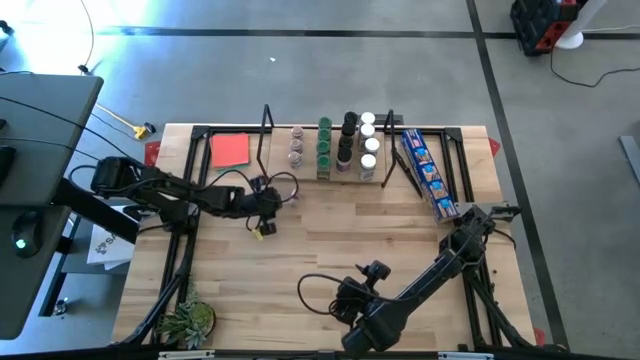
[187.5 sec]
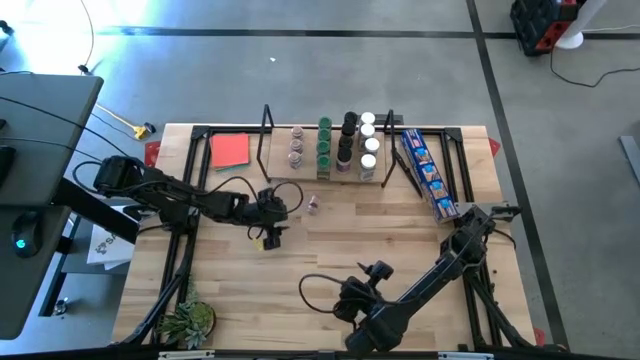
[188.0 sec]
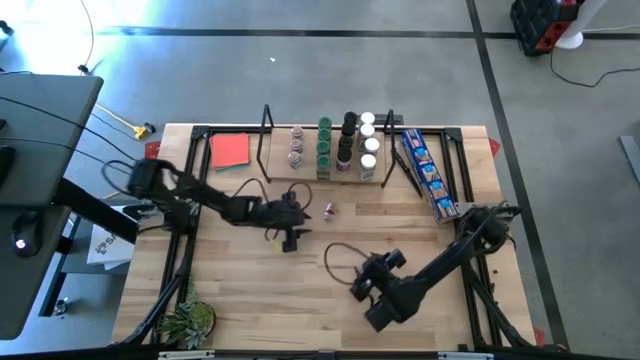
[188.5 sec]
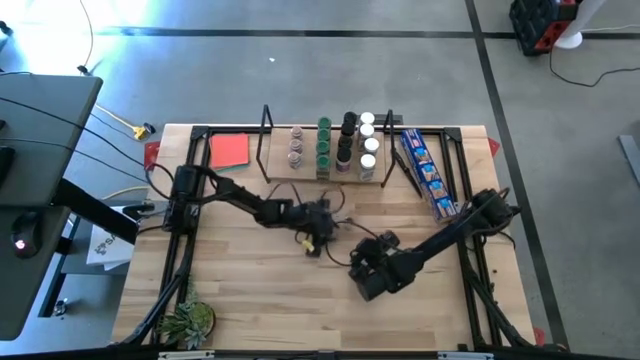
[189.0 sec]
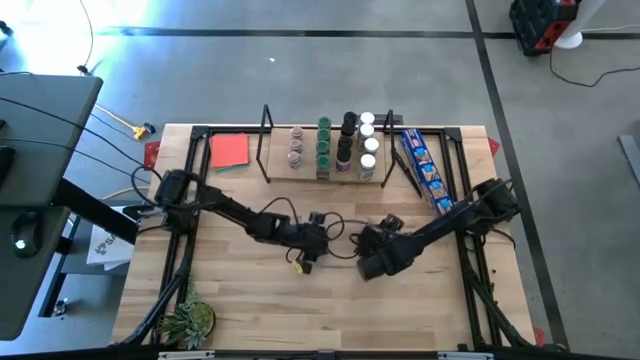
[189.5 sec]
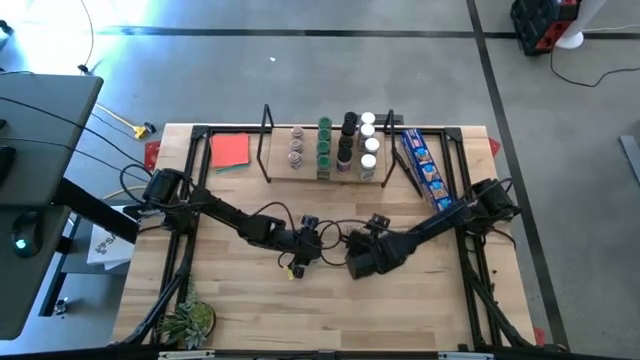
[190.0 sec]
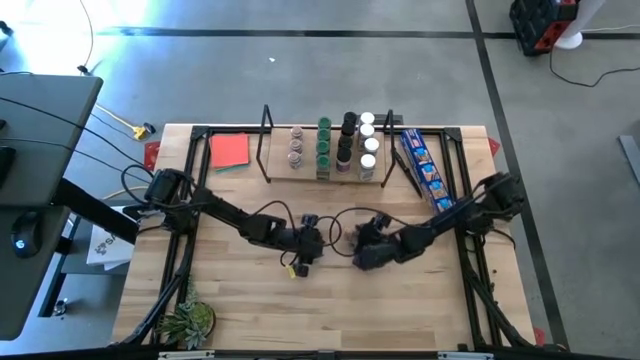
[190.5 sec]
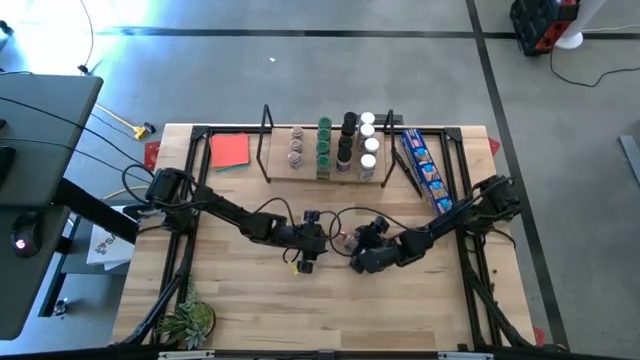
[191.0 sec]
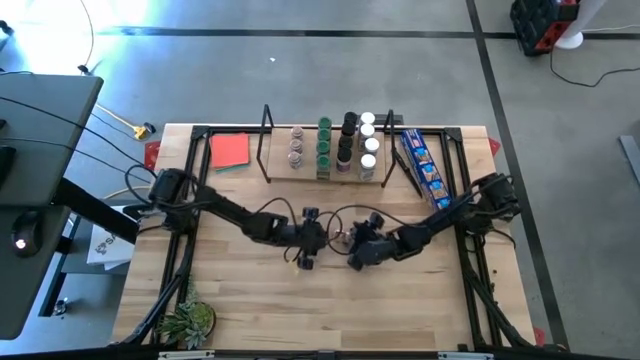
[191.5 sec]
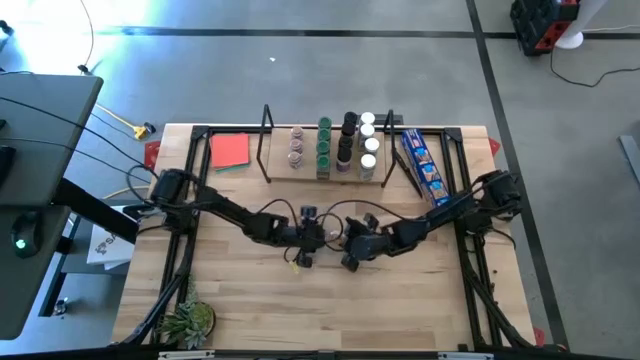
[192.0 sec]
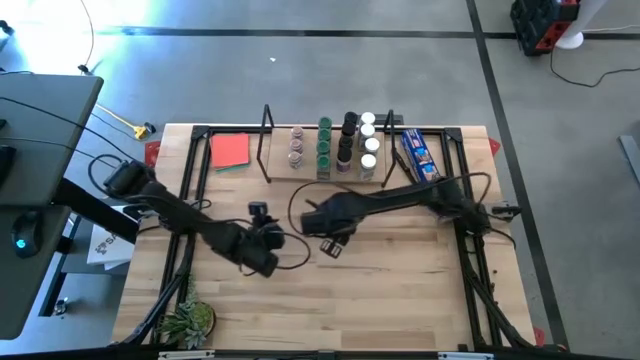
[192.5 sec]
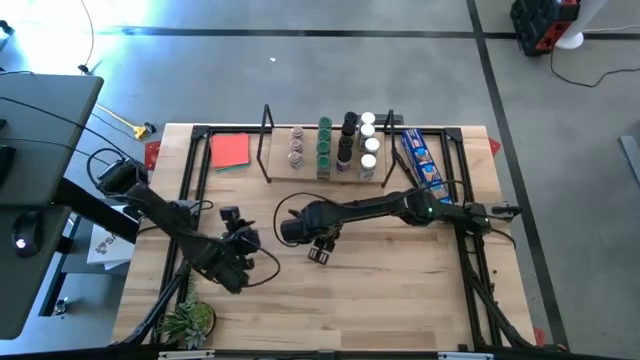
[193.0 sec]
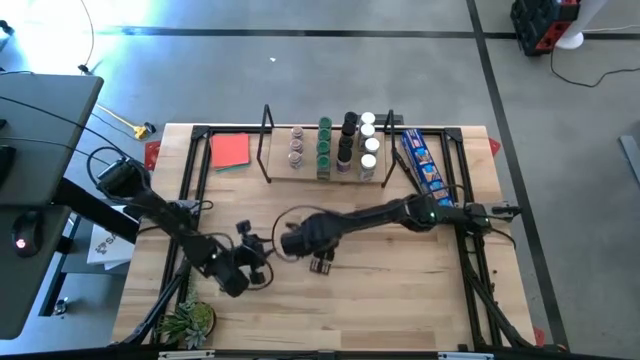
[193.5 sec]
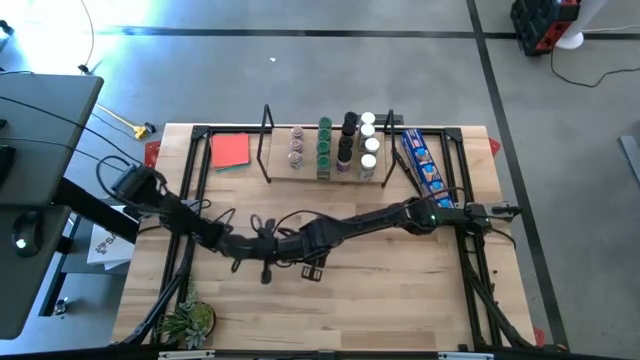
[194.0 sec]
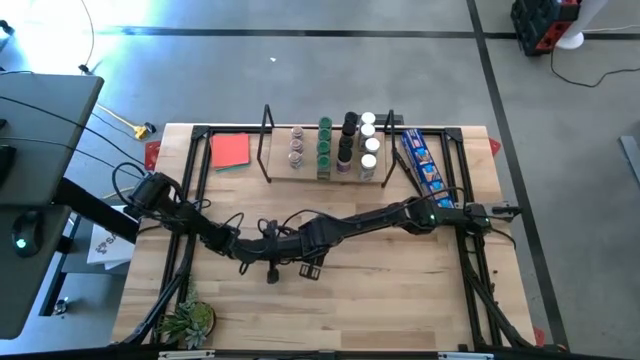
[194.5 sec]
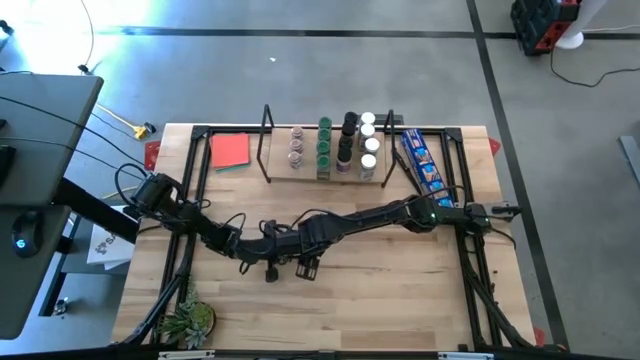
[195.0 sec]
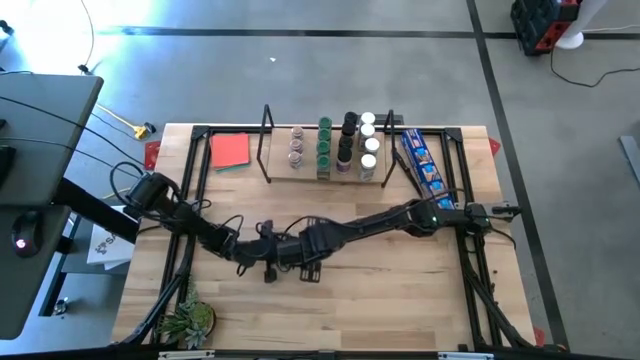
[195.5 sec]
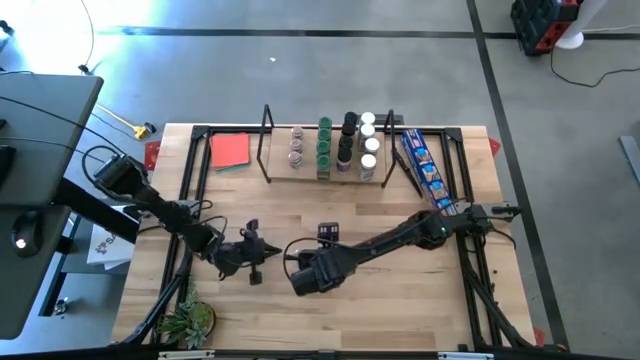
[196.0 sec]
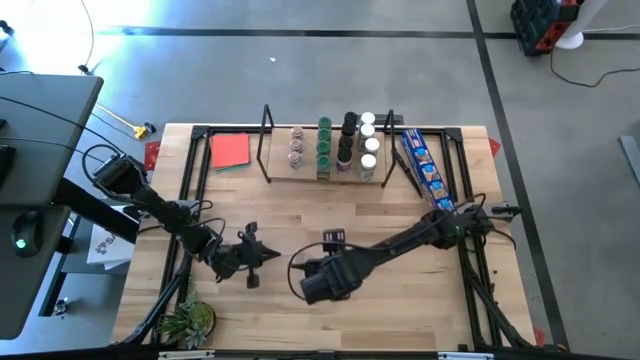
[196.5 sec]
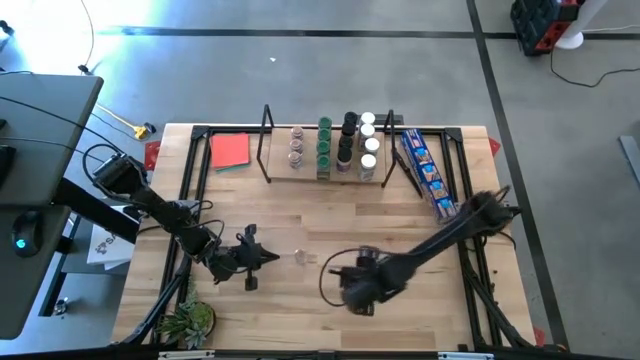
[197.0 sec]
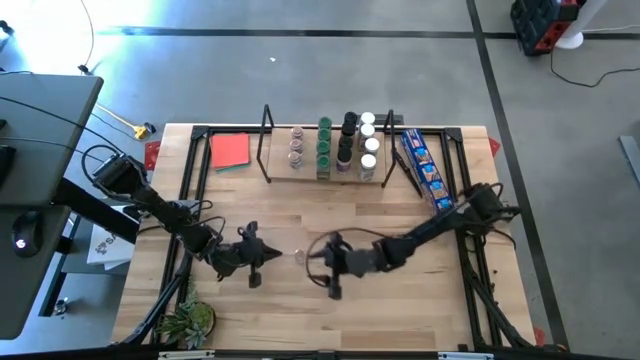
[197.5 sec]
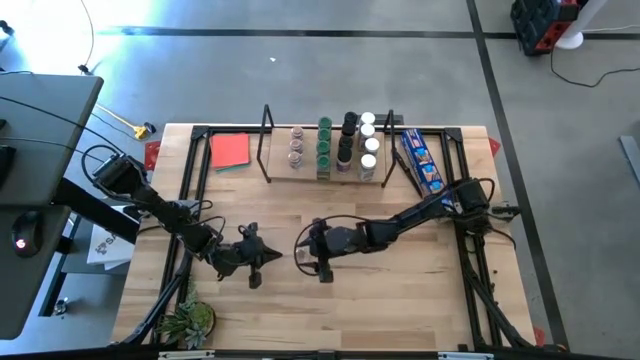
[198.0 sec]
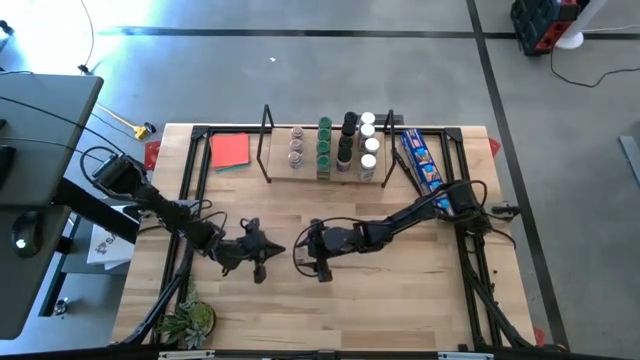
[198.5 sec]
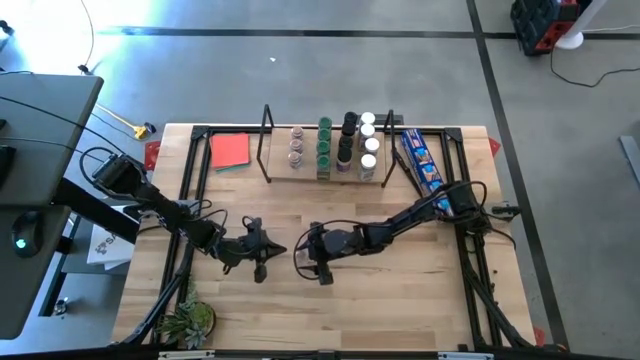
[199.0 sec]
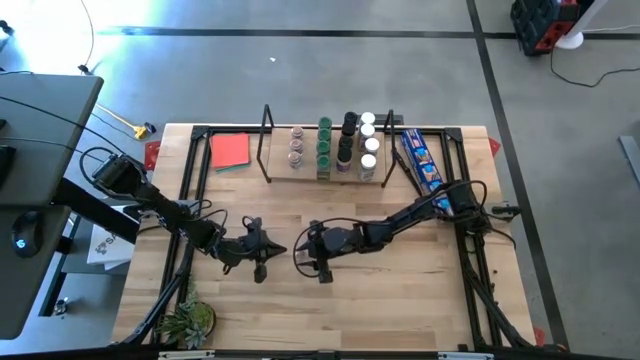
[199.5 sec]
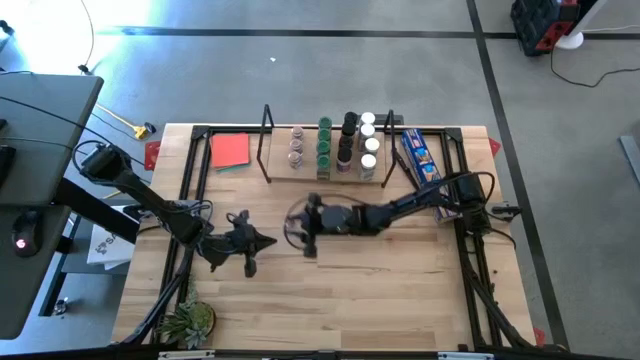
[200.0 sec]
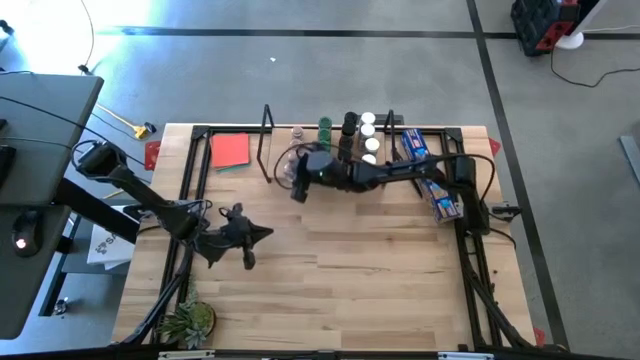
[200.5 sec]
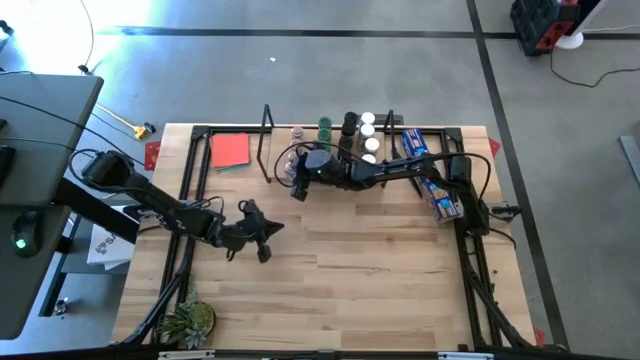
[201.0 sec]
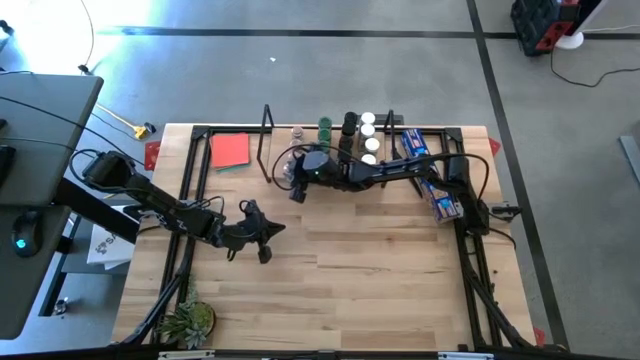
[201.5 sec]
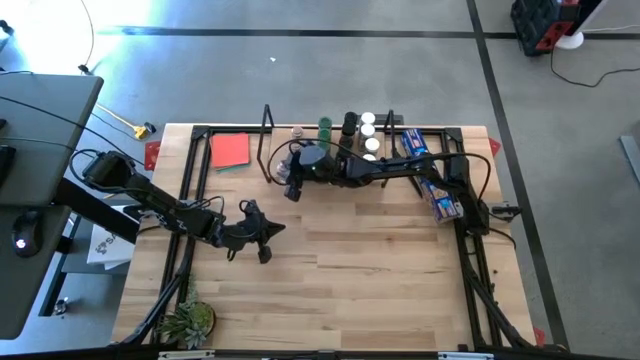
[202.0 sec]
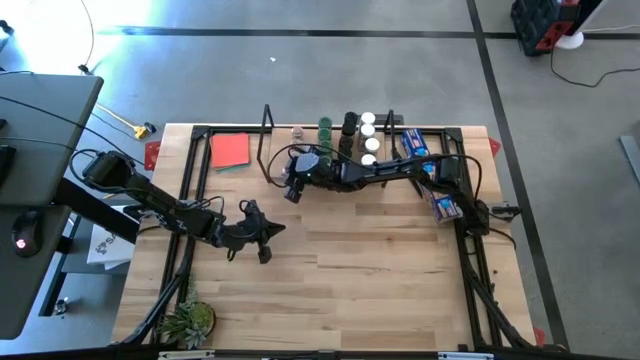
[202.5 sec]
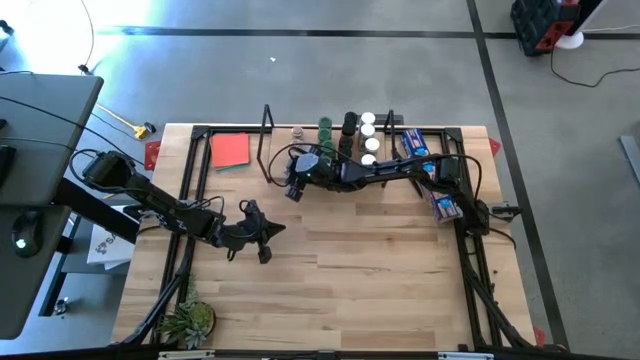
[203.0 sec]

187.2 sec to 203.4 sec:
Task: Shelf spices
Put the brown seasoning bottle on the shelf aligned with the other brown seasoning bottles

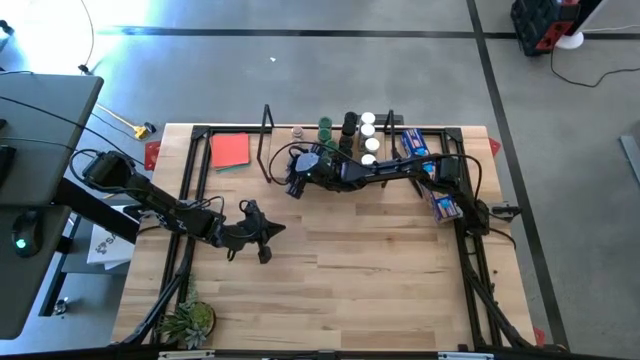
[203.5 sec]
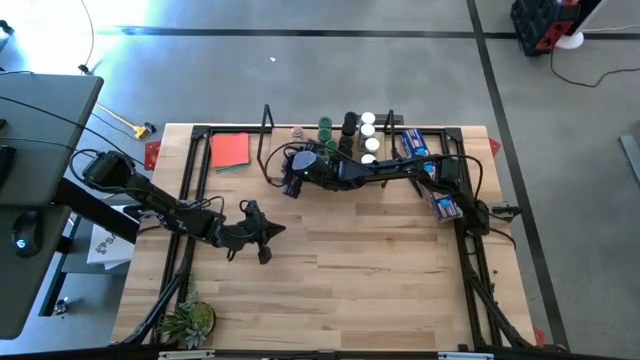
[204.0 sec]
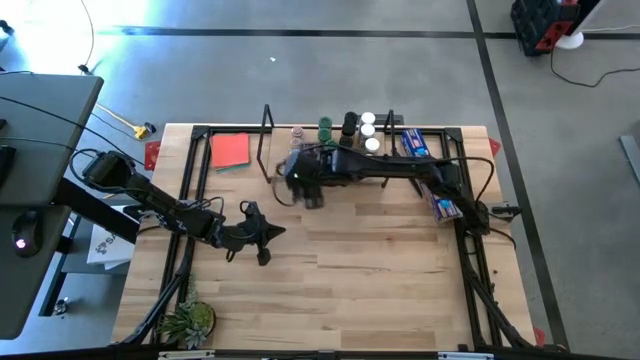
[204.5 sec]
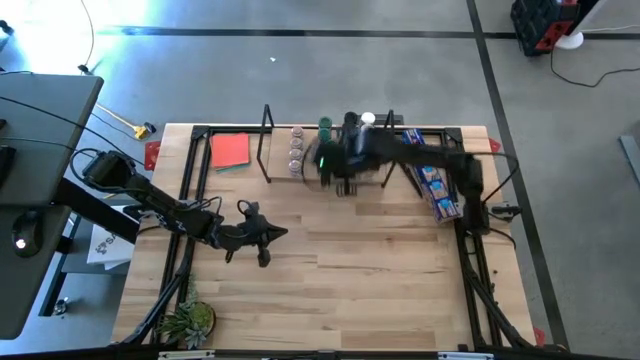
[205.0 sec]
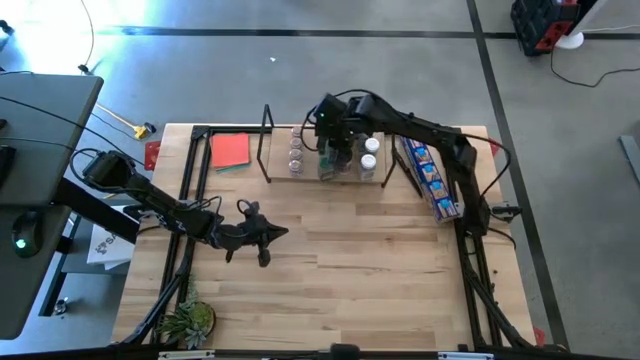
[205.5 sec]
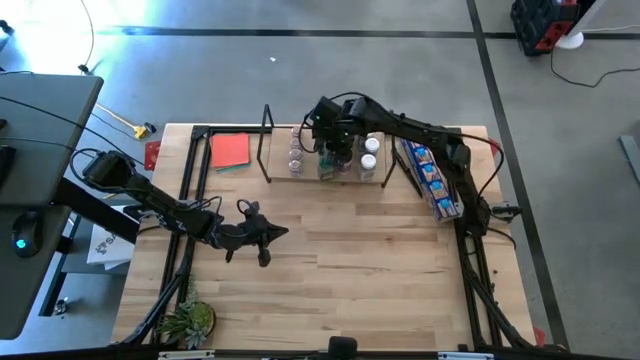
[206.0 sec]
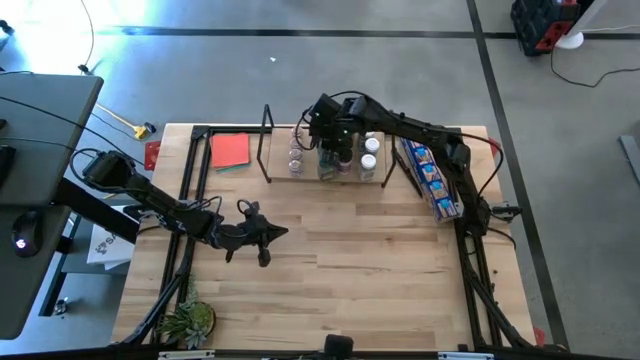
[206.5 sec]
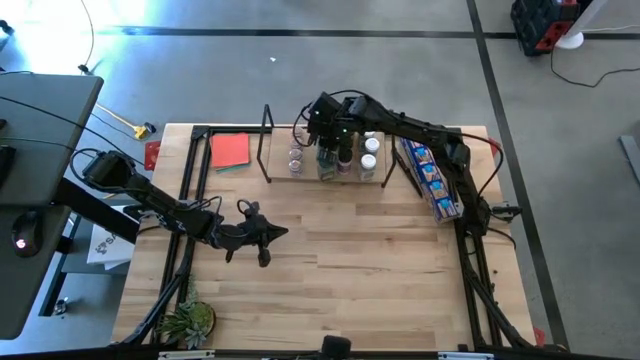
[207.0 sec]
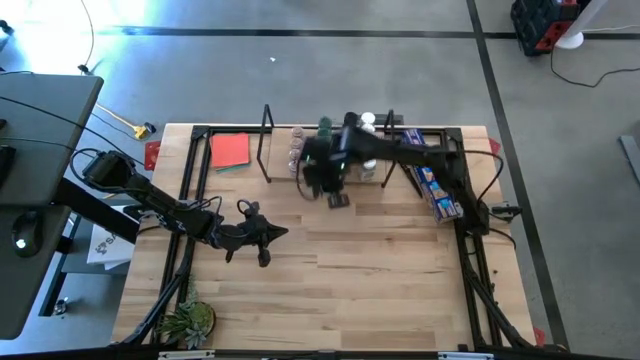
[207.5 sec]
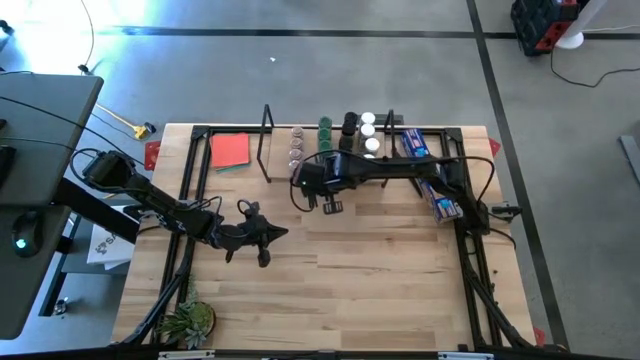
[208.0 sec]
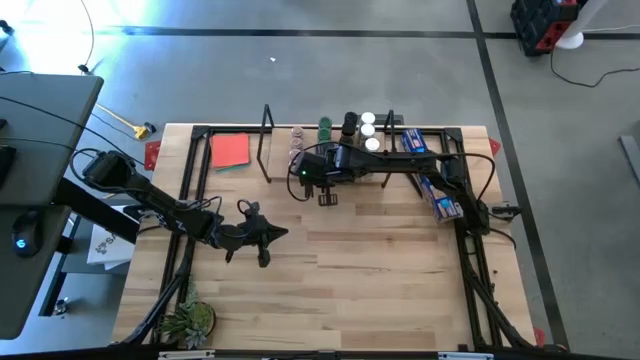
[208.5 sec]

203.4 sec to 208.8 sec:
Adjust the green seasoning bottles
